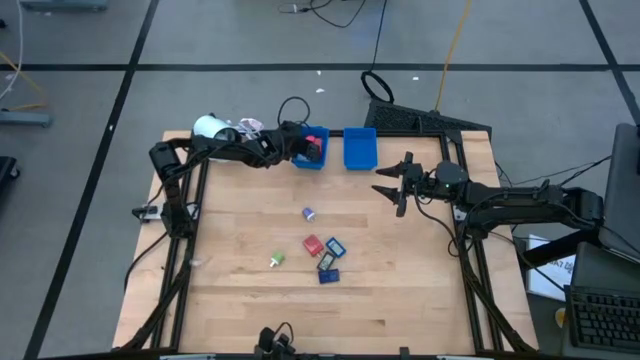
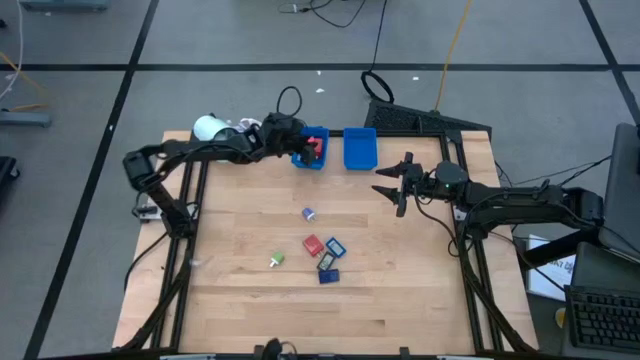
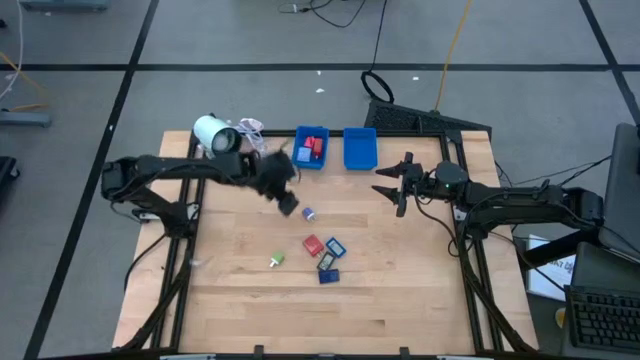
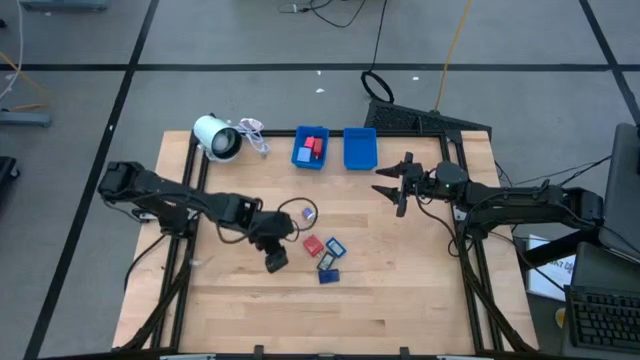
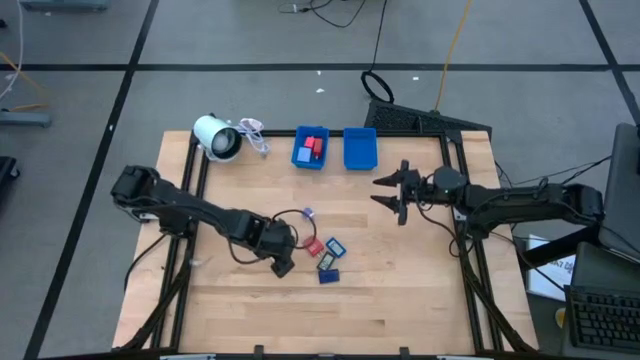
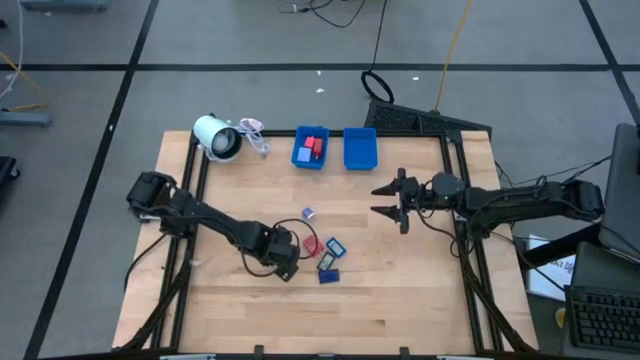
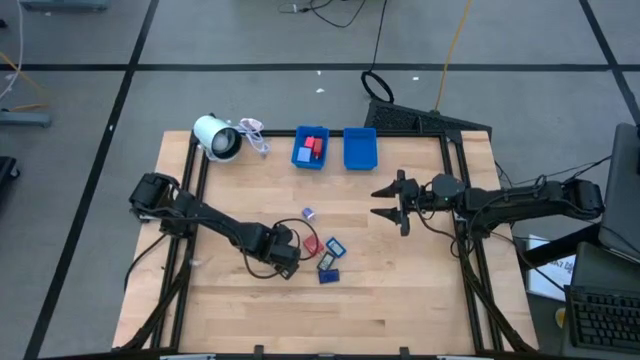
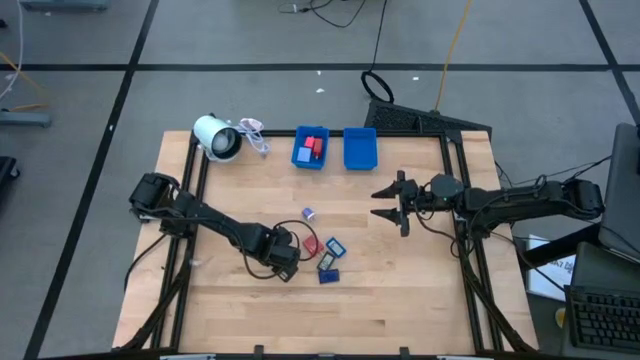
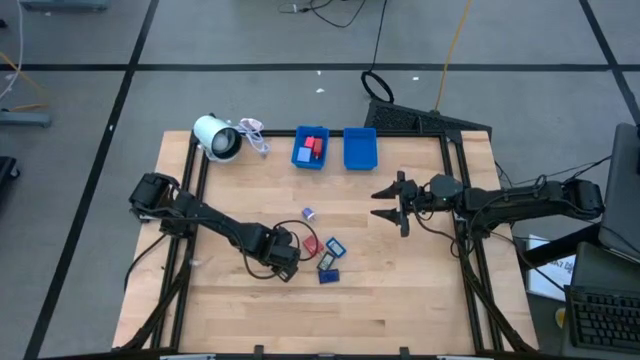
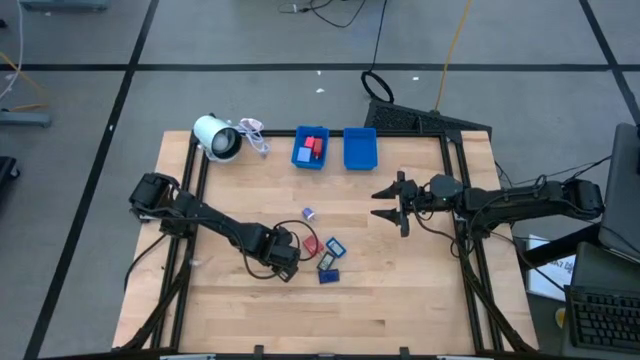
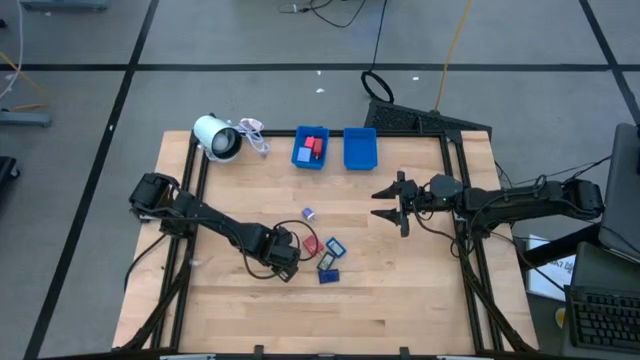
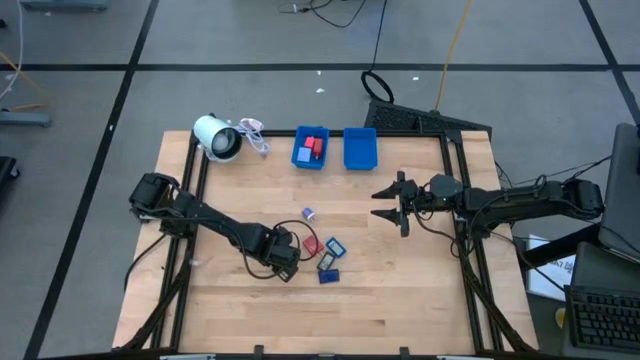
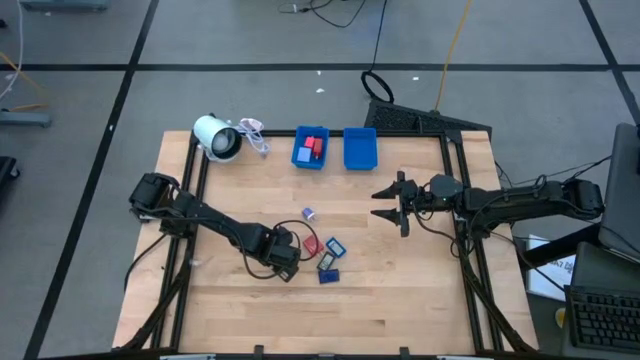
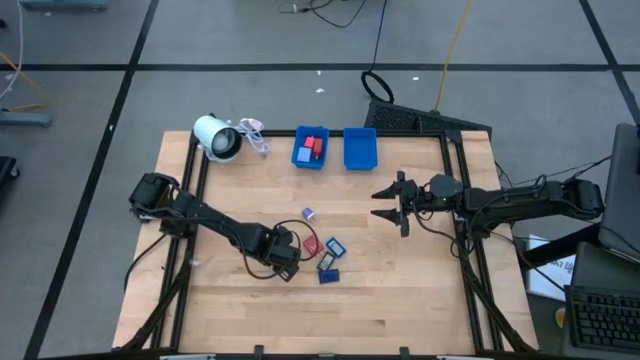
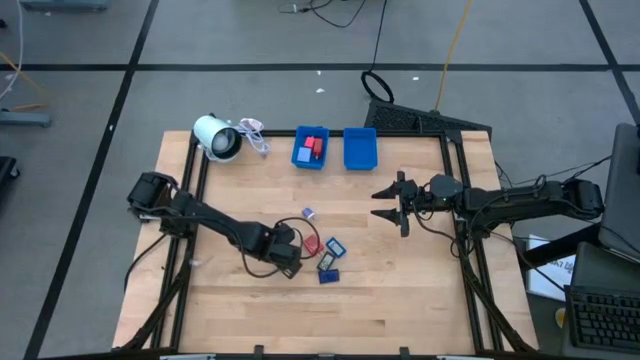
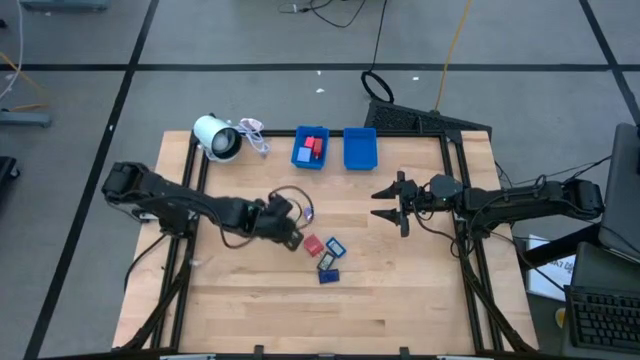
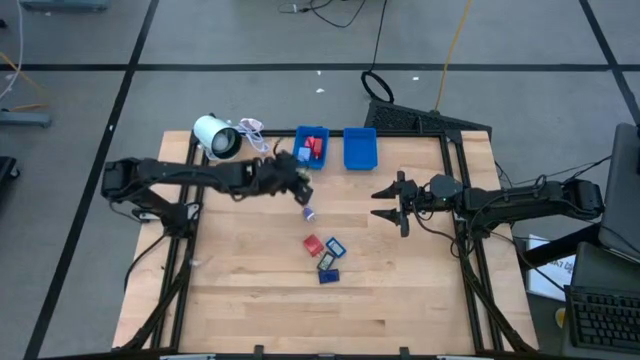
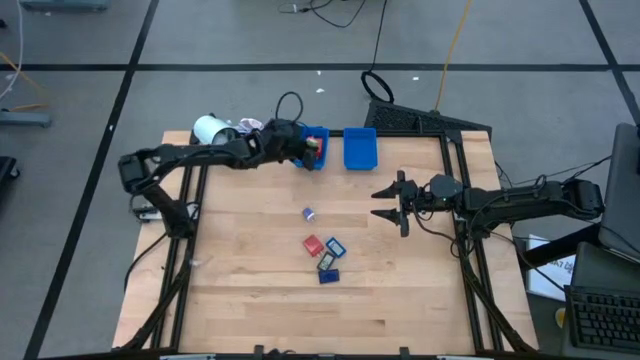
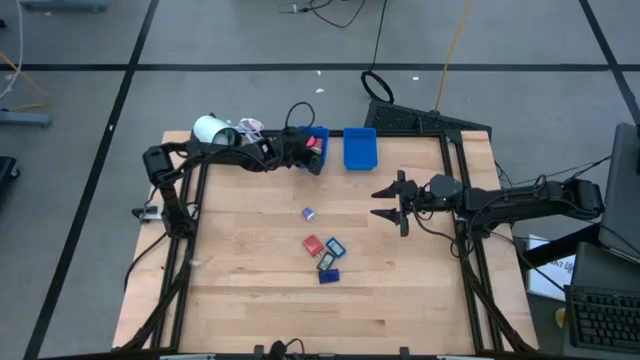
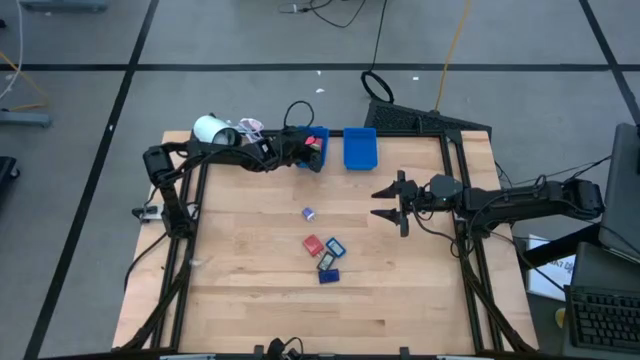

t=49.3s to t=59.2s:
Task: Pick & Place Office items
Put the green charger adapter into the left basket

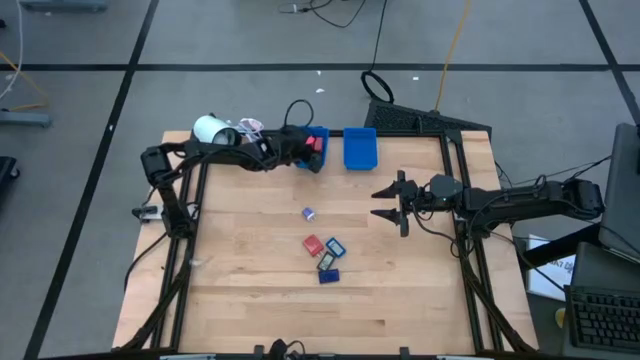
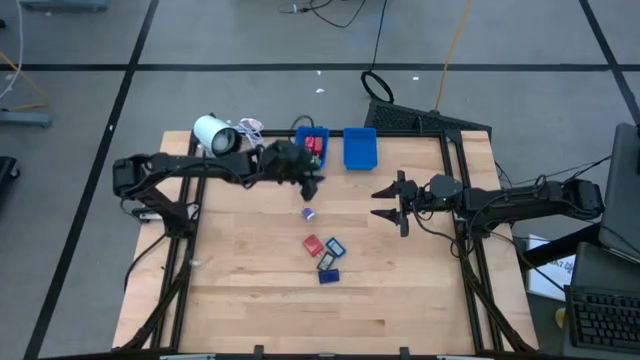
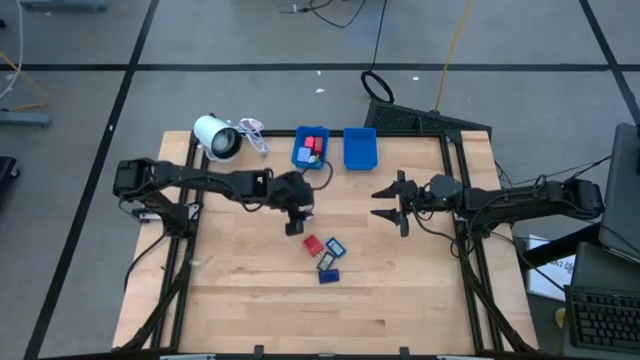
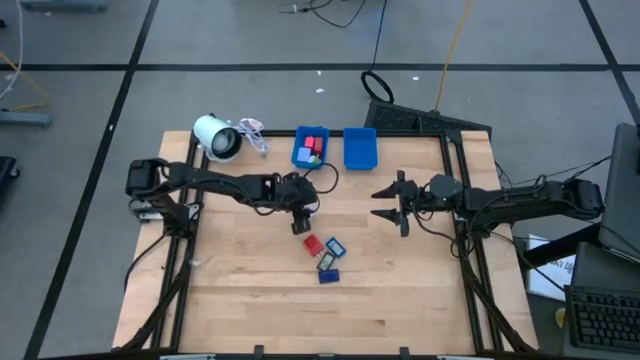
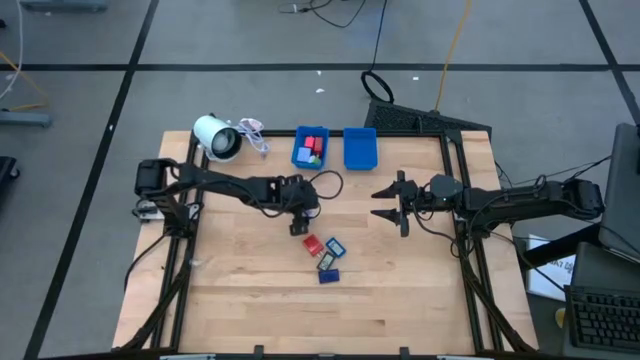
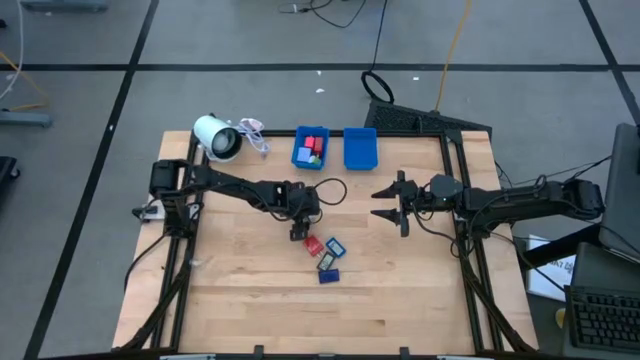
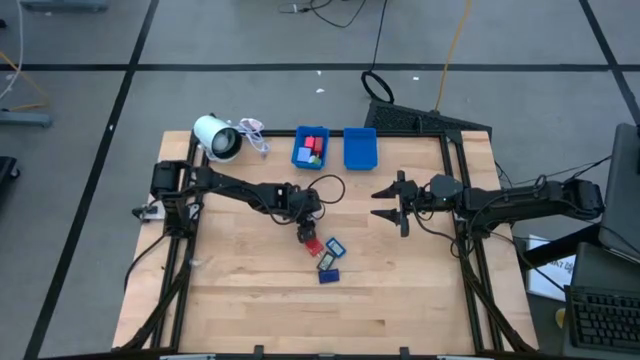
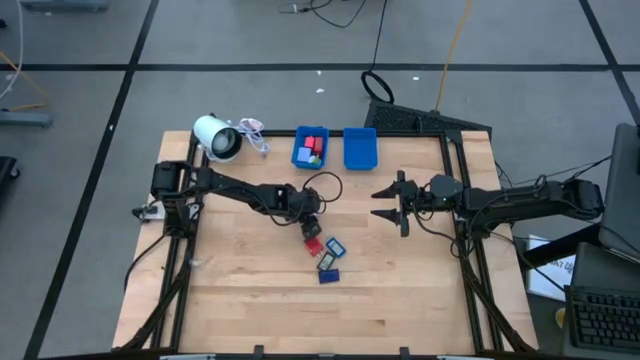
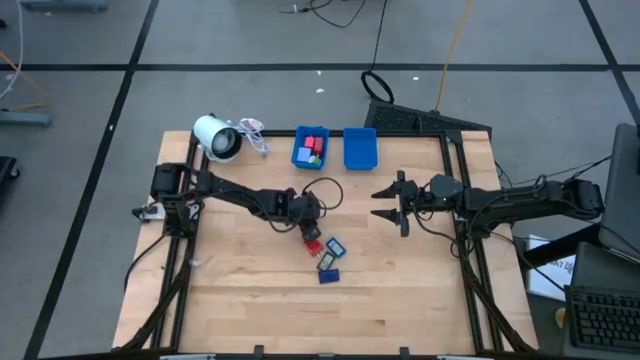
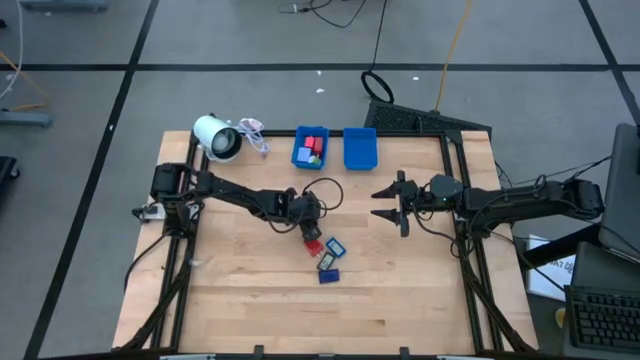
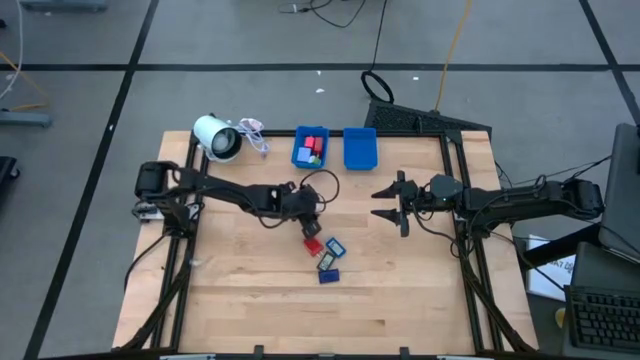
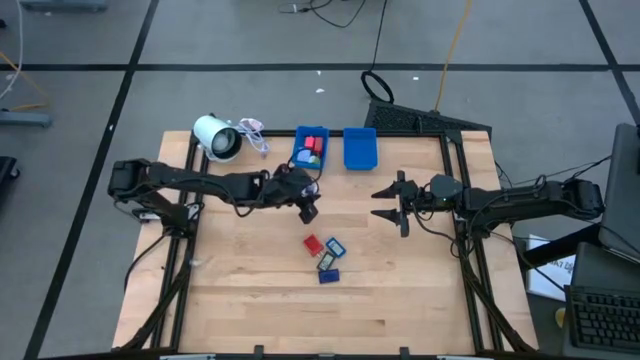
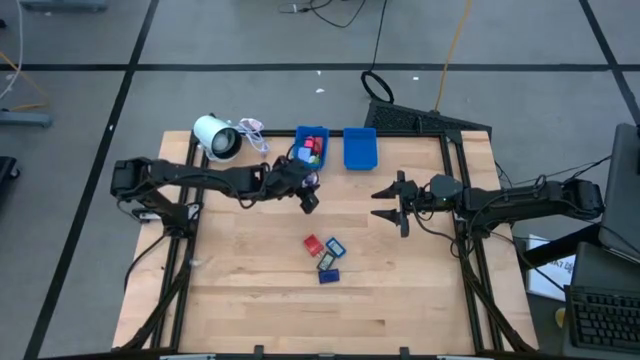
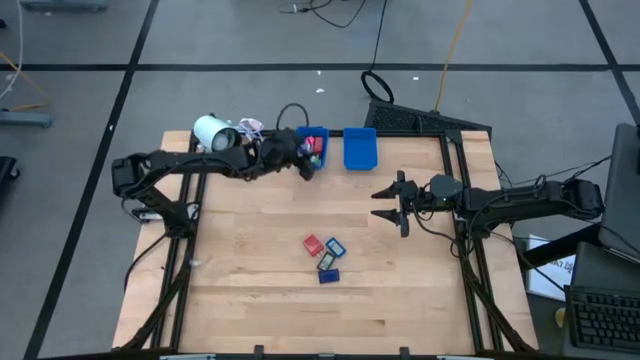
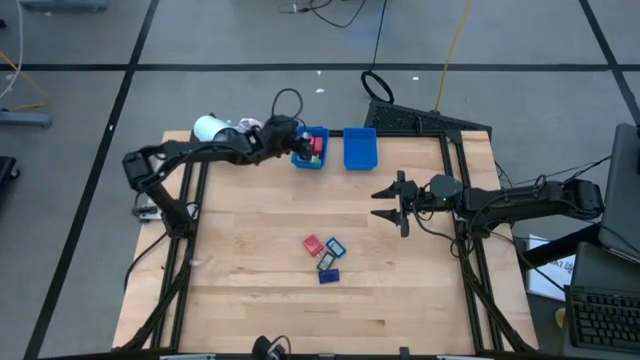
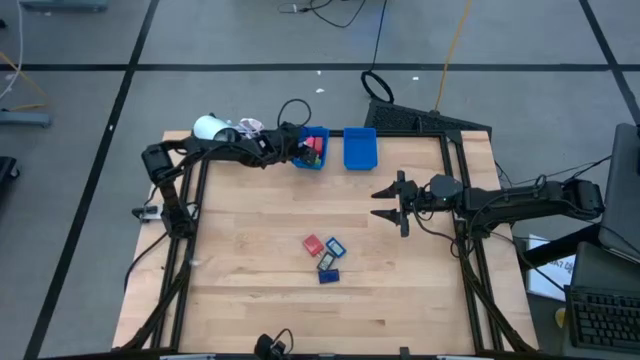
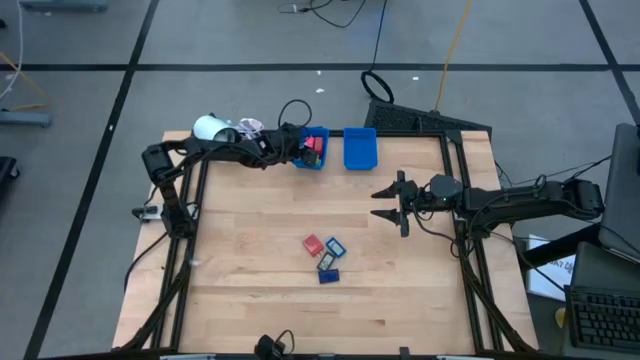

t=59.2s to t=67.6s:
Put the violet charger adapter into the left basket

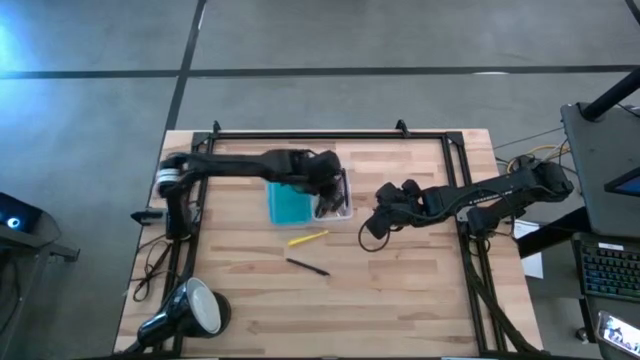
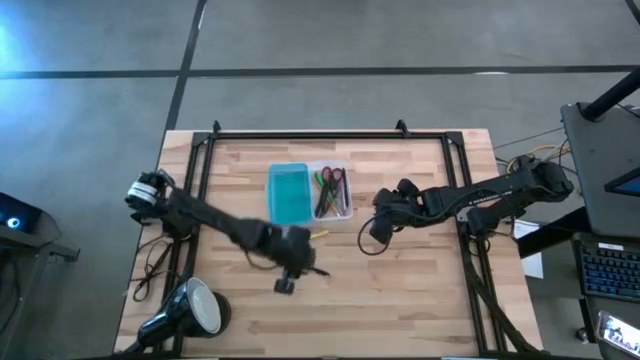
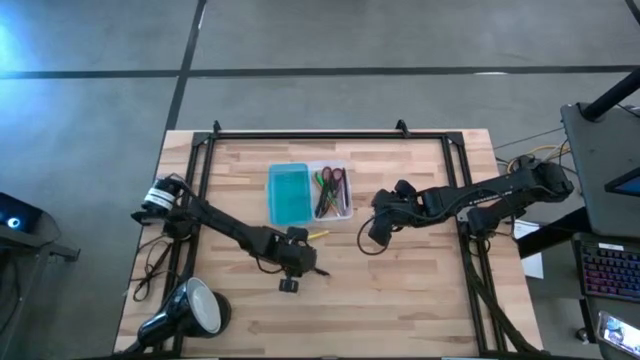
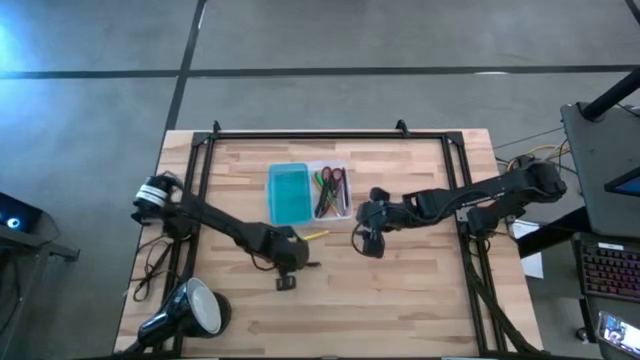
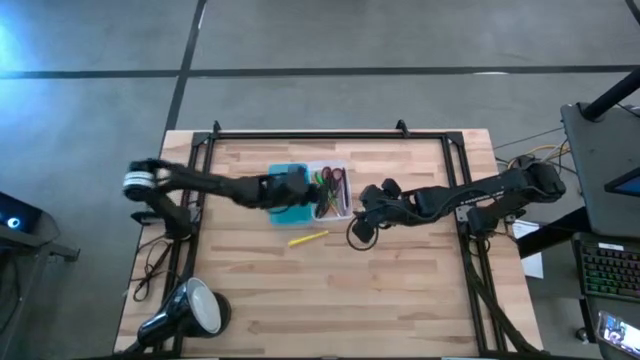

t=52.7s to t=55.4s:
Task: Pick & place school supplies into a supply box
Put the black pen into the blue supply box

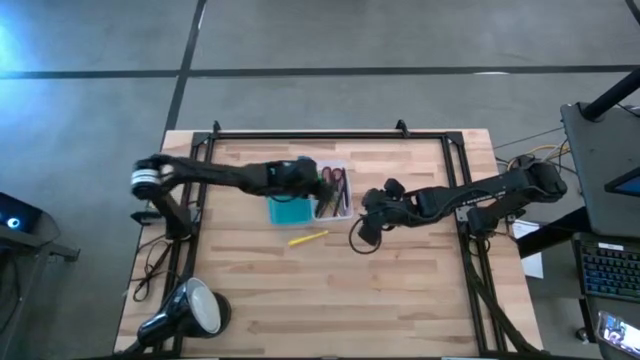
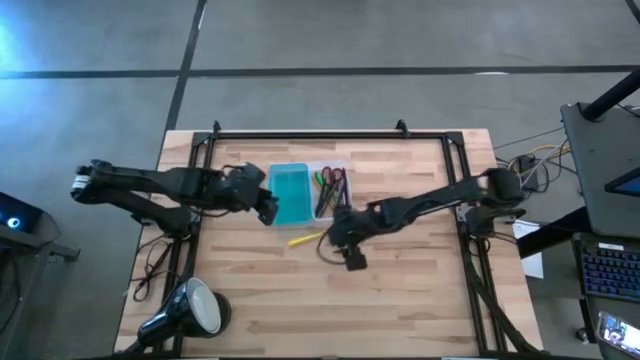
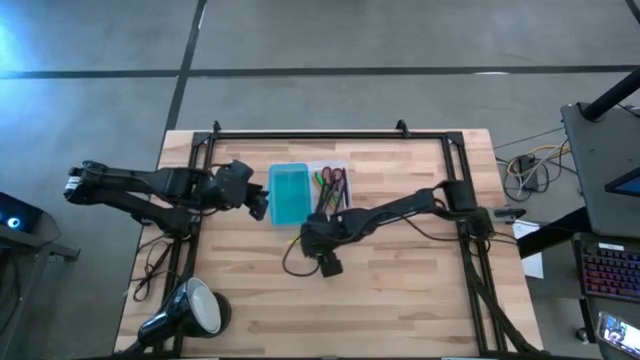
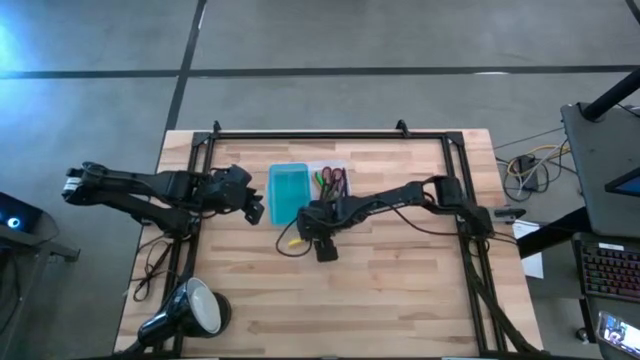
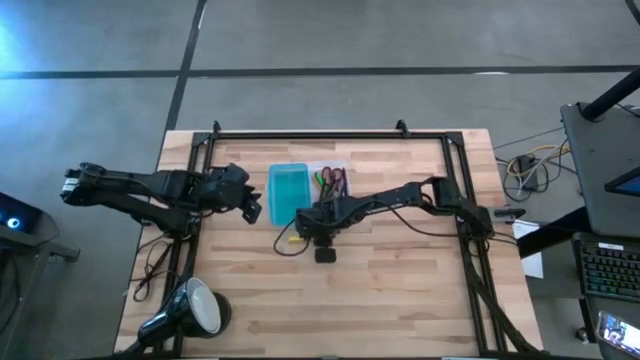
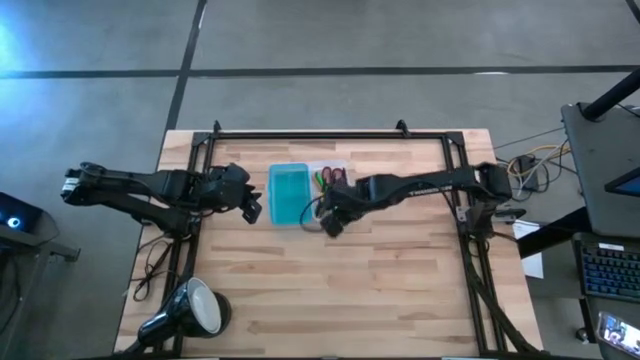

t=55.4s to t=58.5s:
Put the yellow pen into the blue supply box
